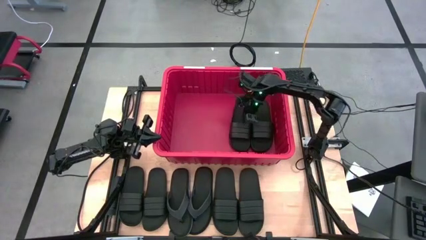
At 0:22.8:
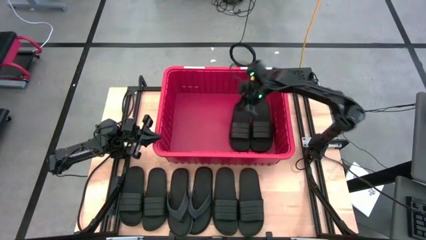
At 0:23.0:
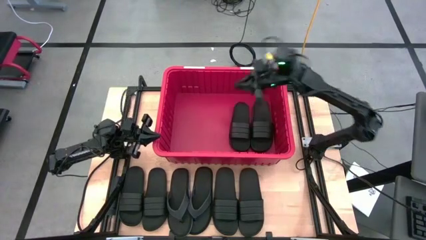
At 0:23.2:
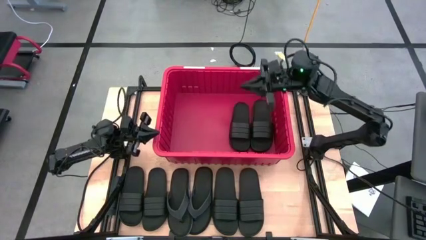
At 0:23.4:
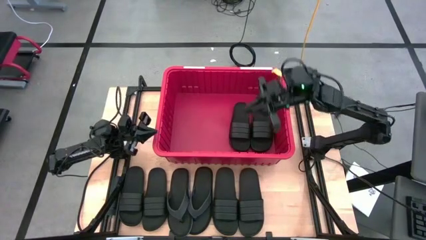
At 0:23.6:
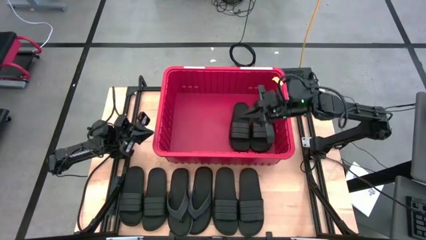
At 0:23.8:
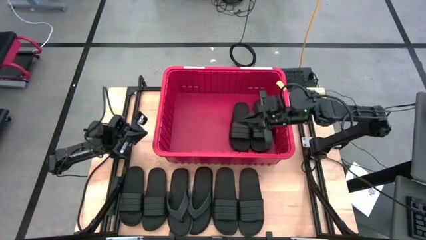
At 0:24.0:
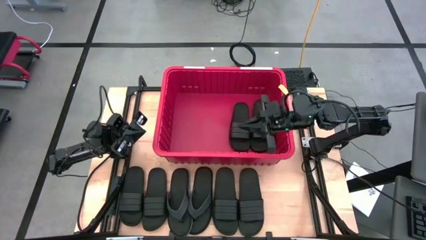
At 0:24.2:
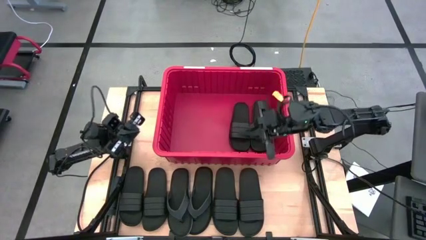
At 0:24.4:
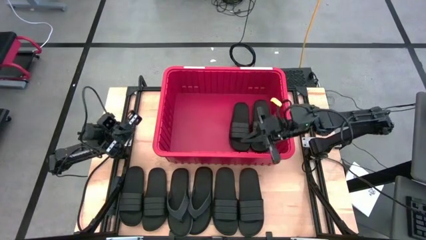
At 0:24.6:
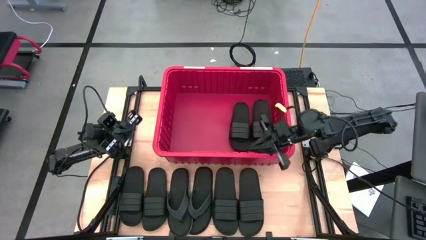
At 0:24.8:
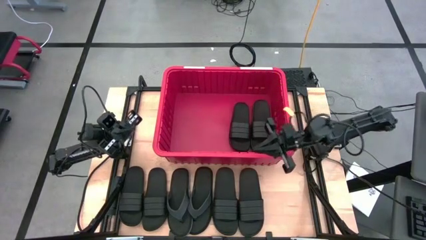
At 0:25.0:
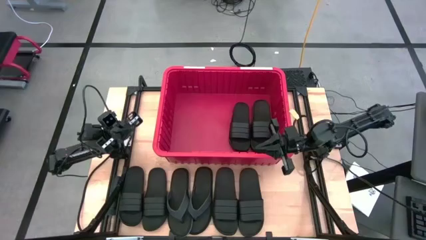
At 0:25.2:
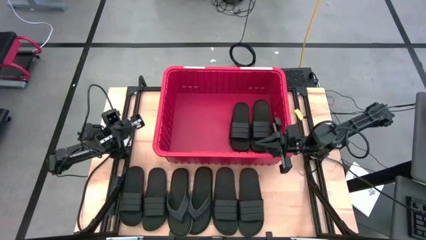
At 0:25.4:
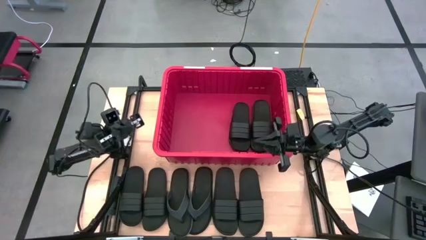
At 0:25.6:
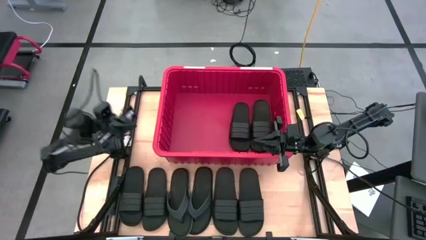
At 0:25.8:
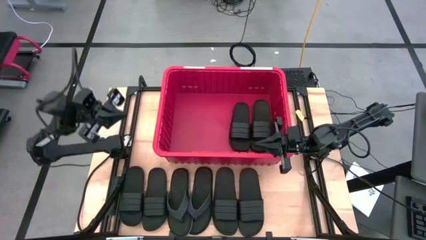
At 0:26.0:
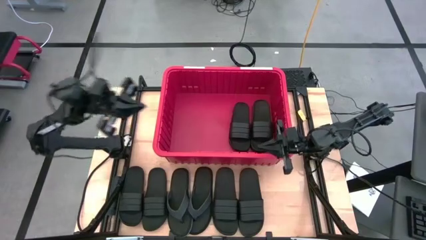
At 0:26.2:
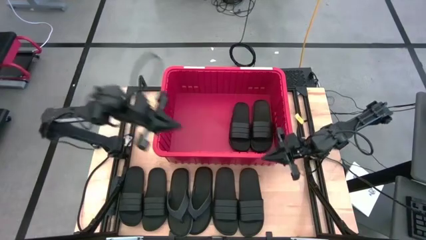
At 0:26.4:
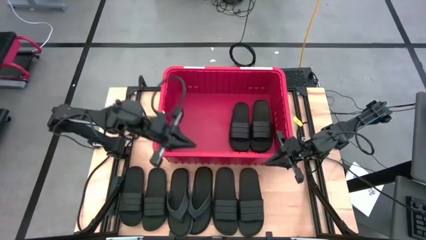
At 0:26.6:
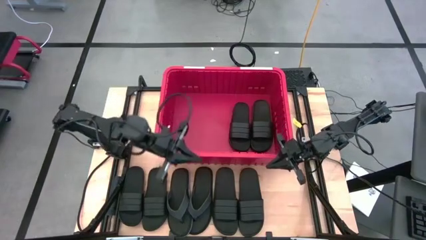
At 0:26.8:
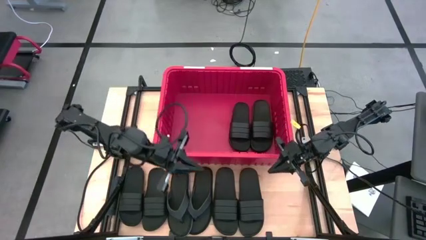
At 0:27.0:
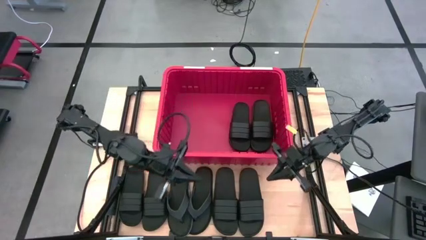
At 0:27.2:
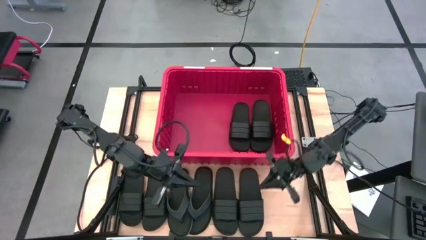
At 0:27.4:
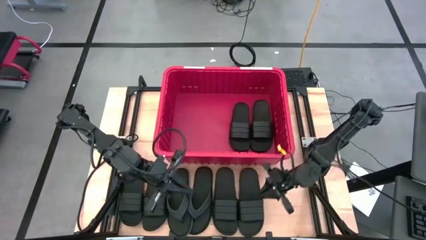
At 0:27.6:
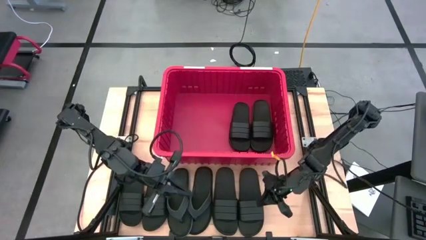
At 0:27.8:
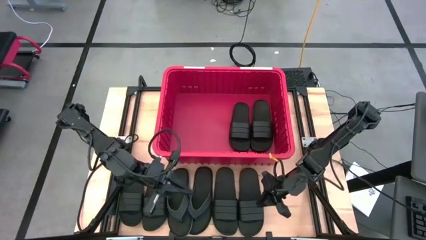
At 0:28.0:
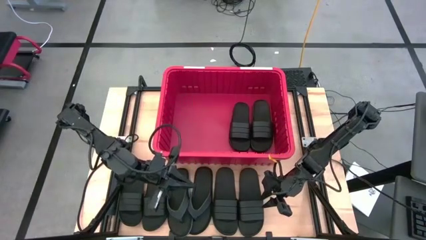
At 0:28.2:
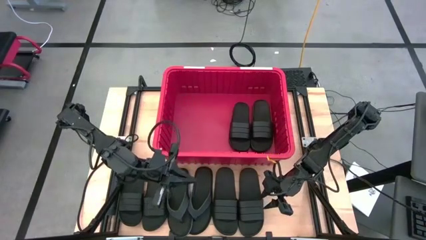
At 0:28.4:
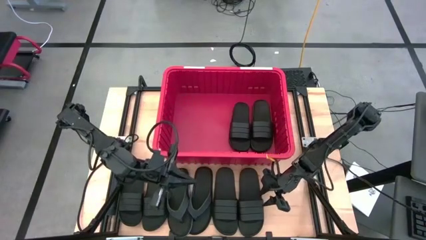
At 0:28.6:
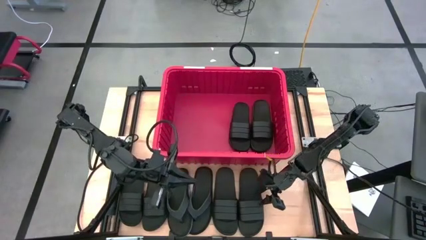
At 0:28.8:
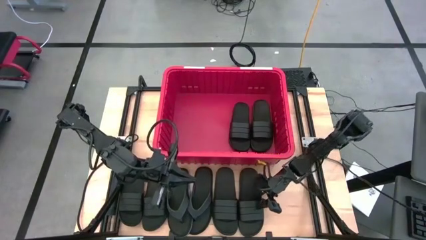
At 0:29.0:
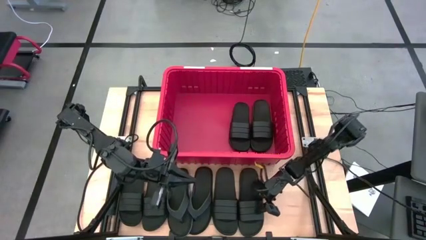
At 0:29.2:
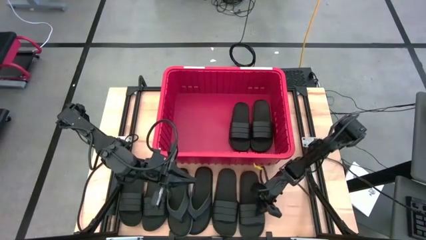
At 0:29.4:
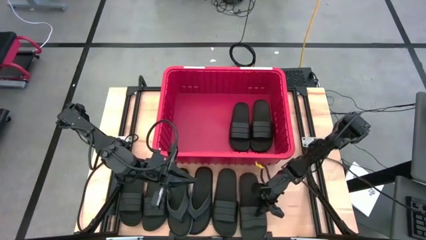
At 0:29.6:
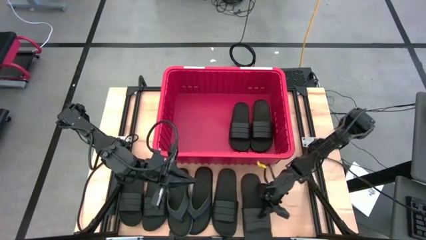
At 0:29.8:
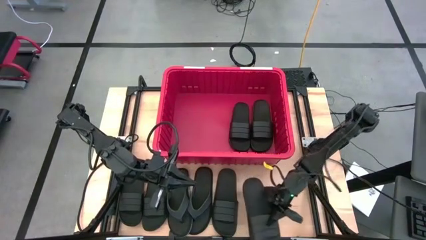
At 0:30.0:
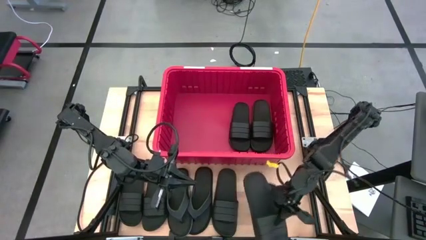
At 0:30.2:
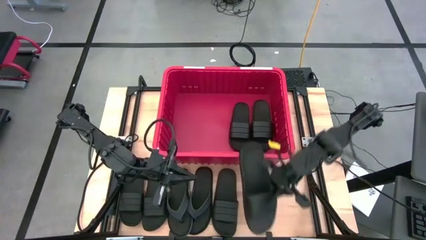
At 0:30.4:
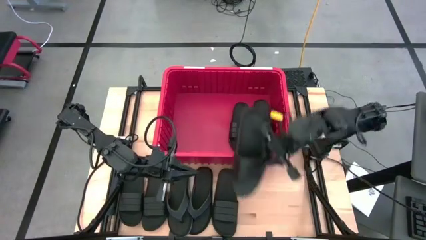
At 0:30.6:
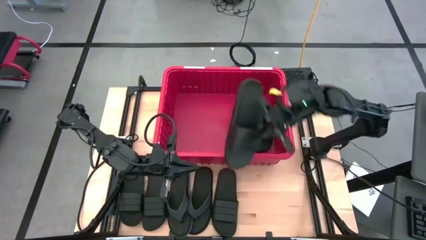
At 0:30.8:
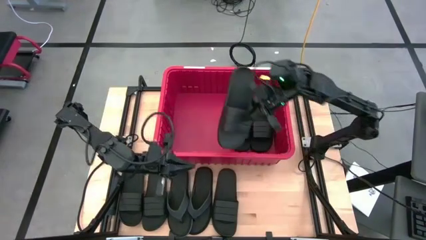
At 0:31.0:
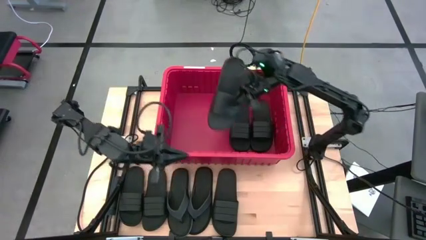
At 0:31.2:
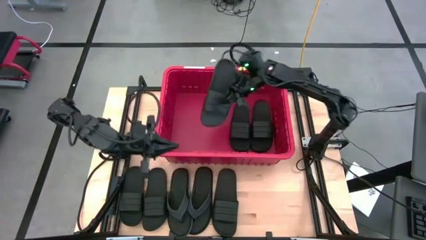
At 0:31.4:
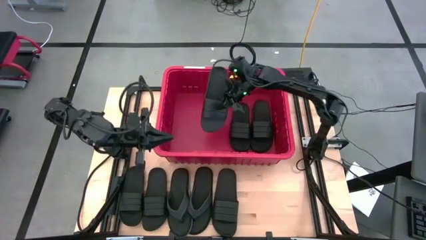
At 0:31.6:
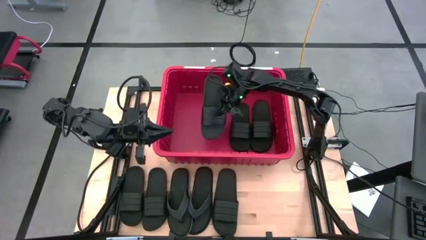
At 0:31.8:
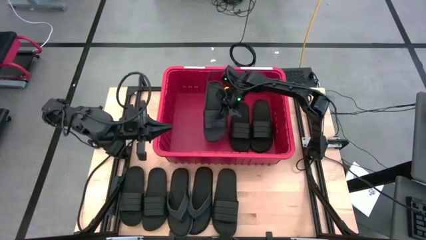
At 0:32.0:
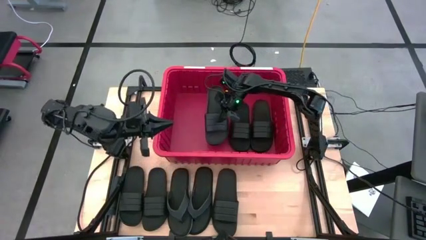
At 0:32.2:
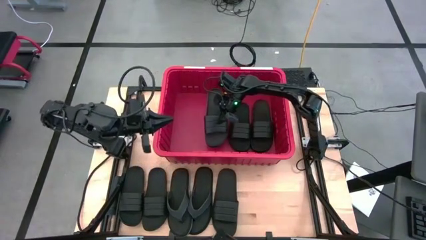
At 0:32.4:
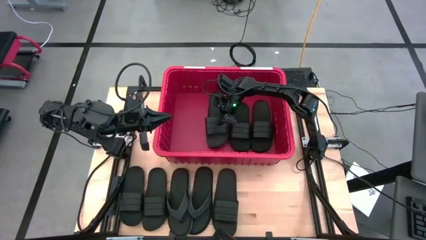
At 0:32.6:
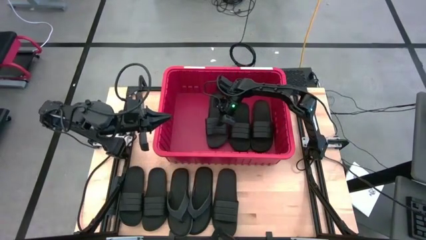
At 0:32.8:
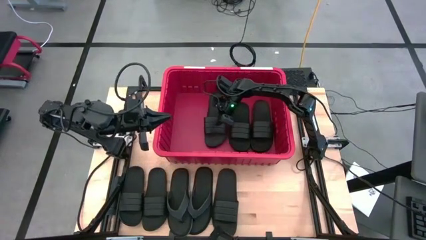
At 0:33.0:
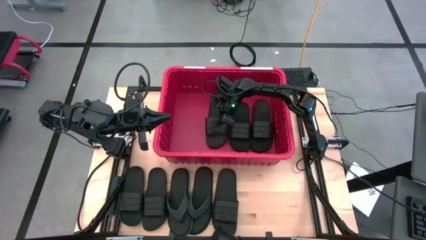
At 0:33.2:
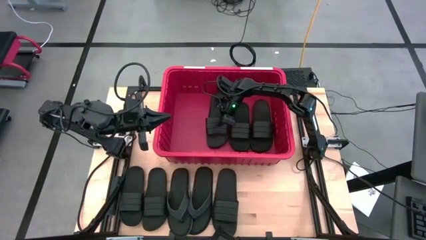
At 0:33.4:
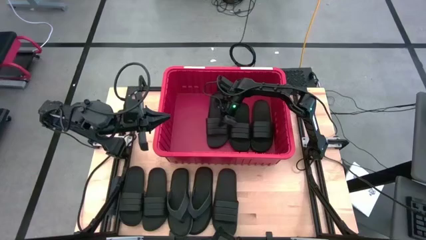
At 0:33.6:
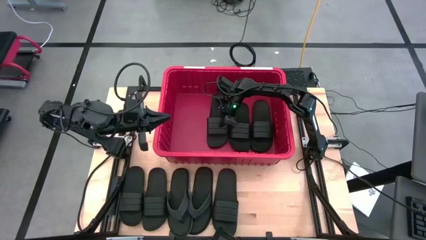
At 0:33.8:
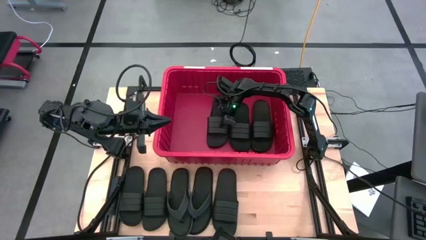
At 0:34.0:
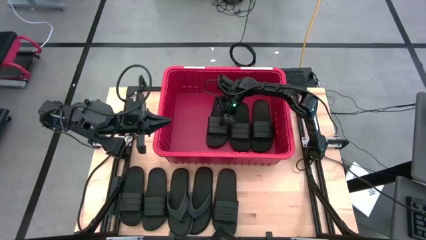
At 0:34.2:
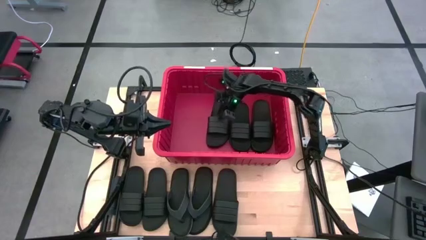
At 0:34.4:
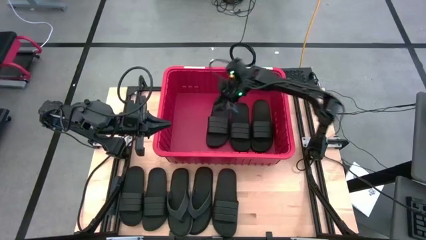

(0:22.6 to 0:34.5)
Task: Pick and place slides into bin
Put the slipper into the bin

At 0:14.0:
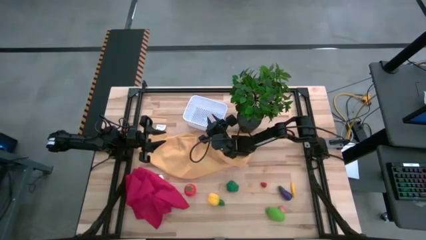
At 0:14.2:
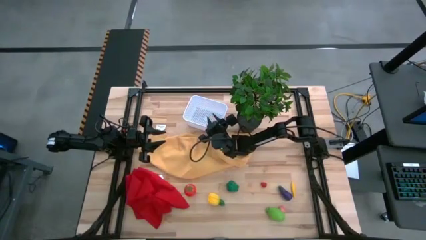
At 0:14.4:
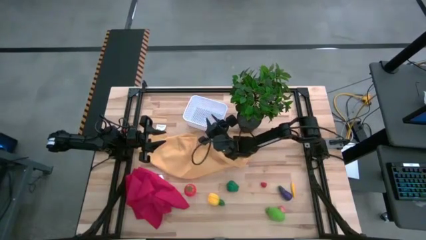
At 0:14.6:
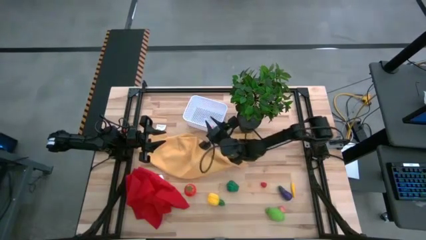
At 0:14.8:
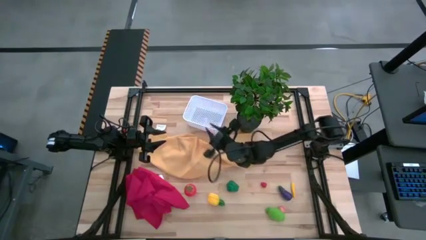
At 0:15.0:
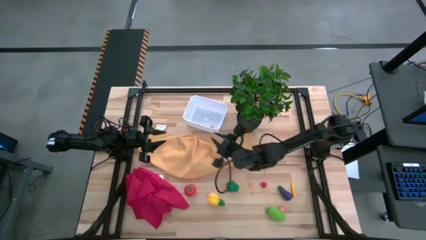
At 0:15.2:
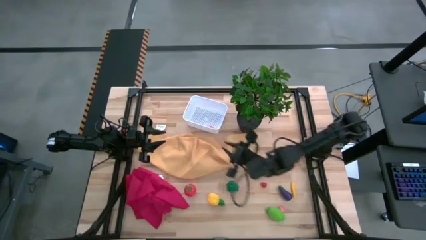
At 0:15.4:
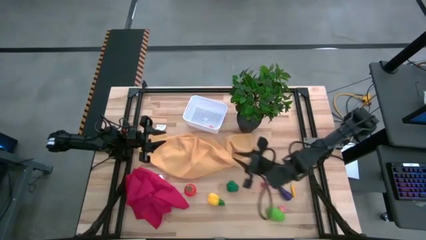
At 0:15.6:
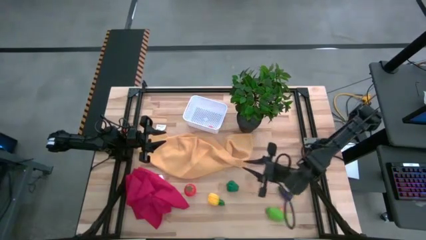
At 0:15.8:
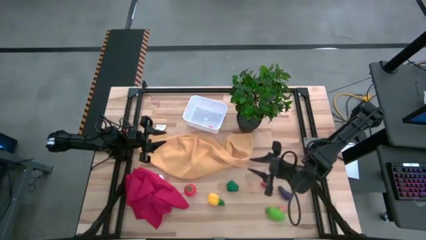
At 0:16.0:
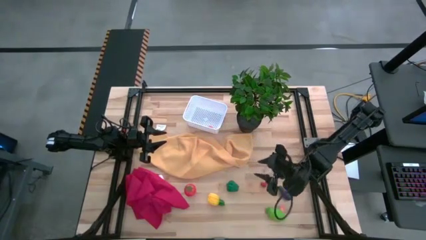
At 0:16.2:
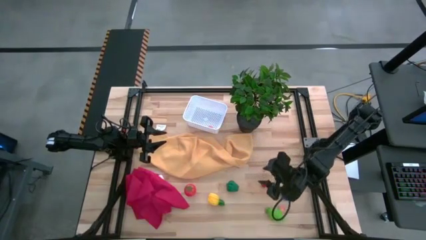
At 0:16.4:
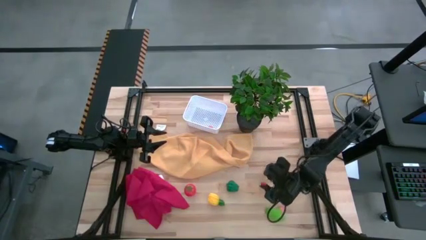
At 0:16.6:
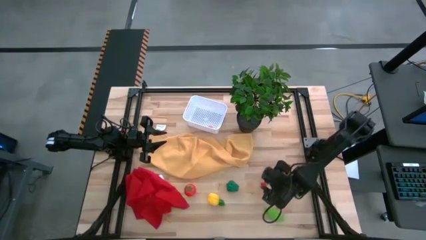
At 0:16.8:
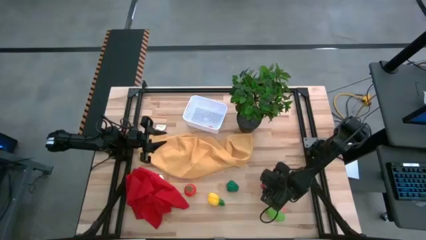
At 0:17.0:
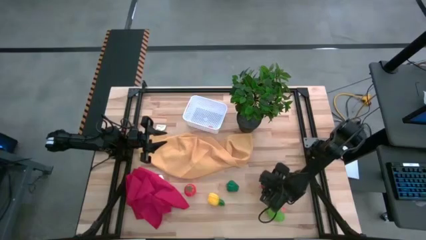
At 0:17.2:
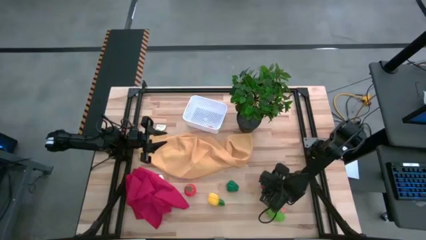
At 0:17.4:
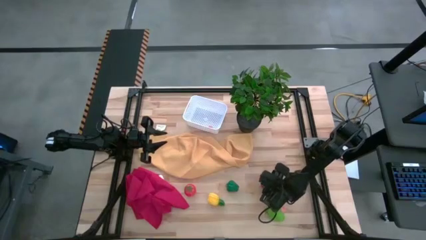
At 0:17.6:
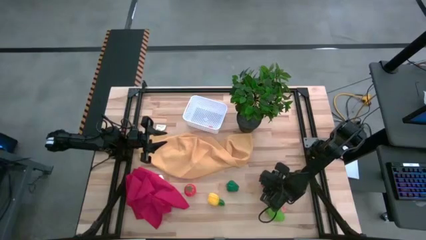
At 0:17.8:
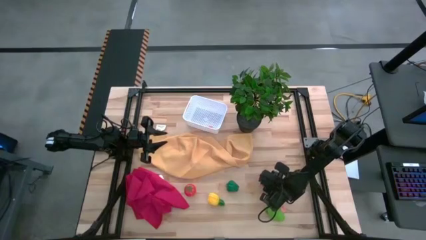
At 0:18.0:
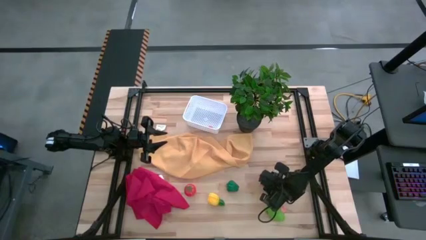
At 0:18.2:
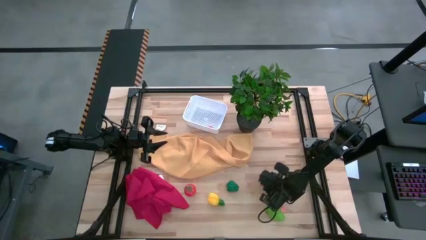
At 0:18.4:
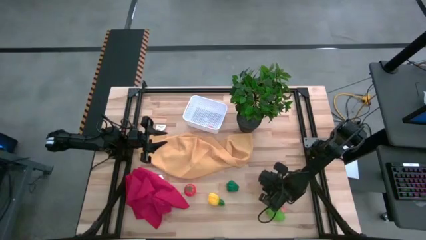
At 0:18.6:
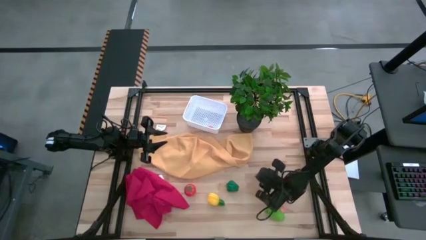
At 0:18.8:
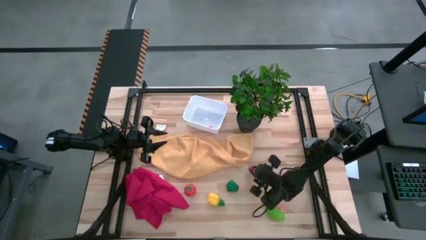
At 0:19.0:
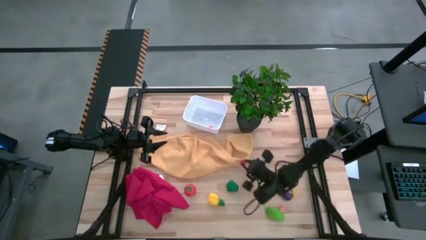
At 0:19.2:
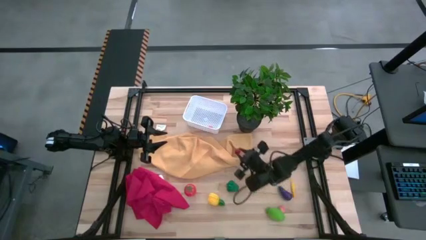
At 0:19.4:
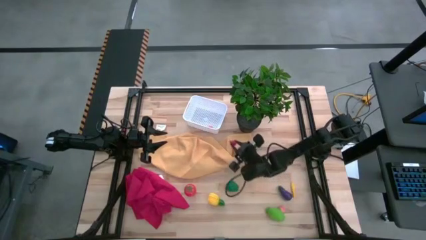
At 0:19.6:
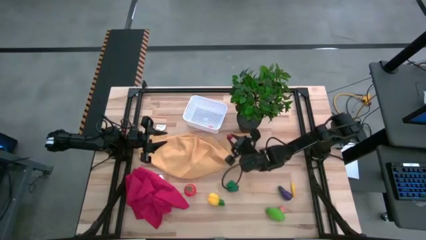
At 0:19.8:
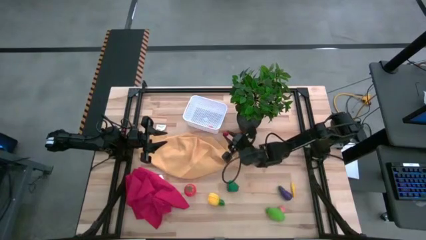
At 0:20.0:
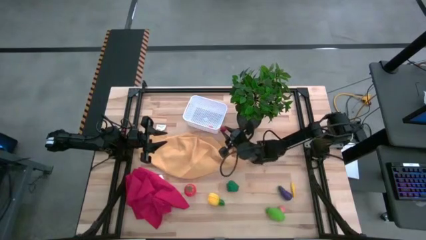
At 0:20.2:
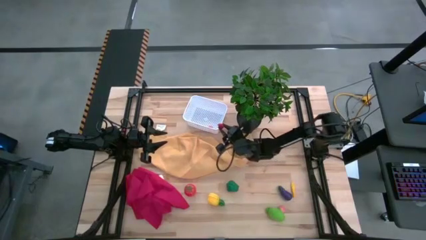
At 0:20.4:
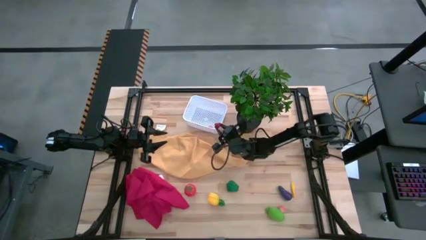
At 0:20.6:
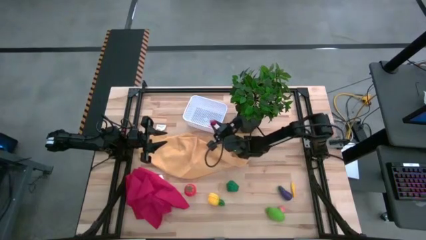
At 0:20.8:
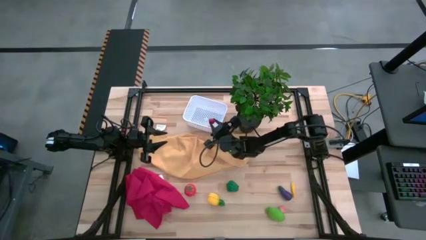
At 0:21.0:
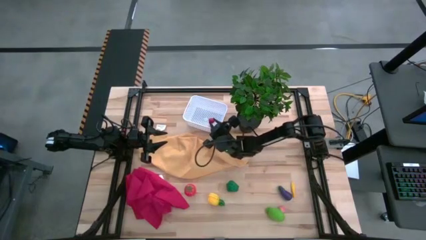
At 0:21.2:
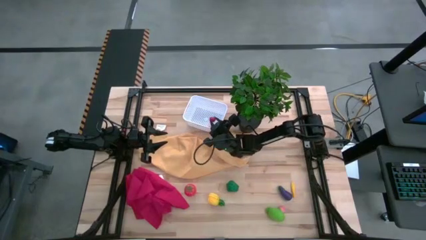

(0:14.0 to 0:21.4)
Task: Pick and placing Produce into tupperware
Put the red raspberry into the white bin
